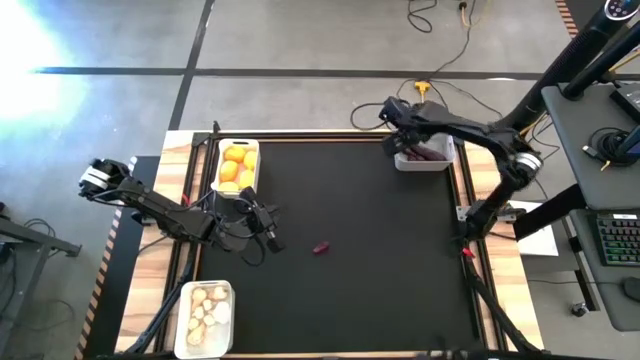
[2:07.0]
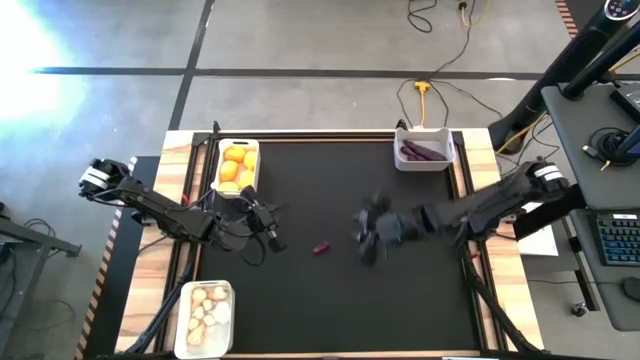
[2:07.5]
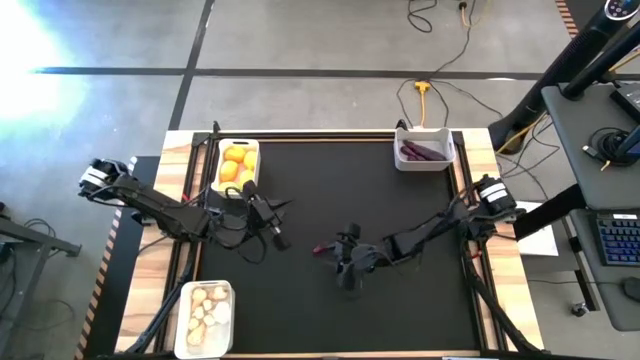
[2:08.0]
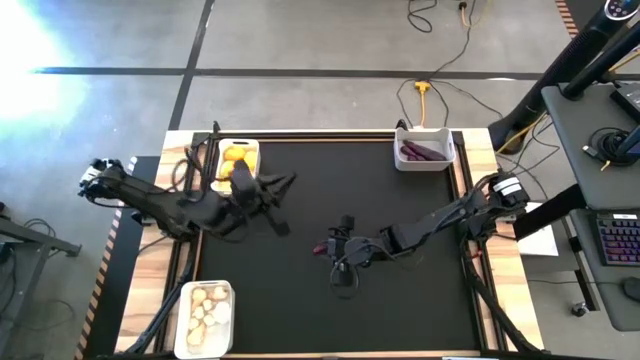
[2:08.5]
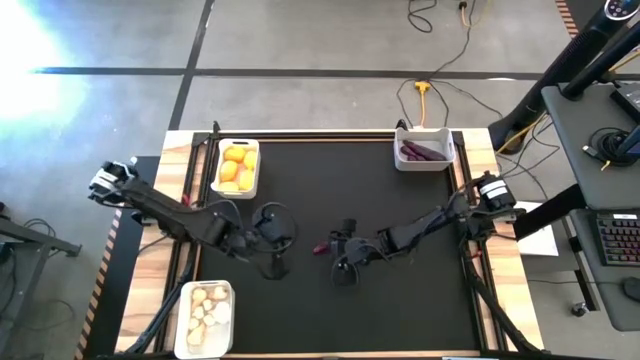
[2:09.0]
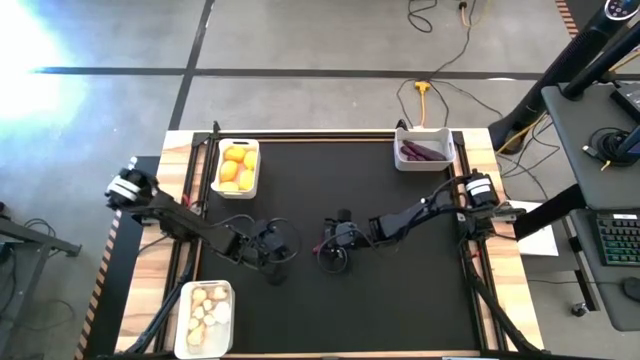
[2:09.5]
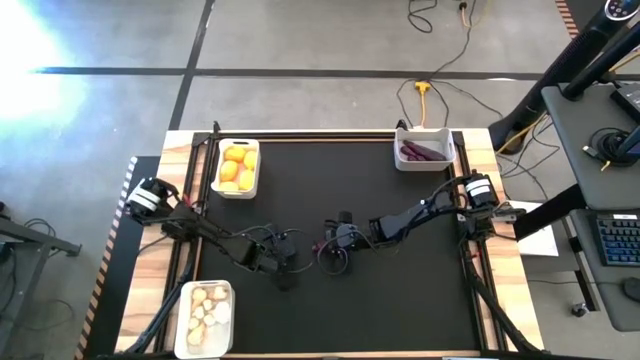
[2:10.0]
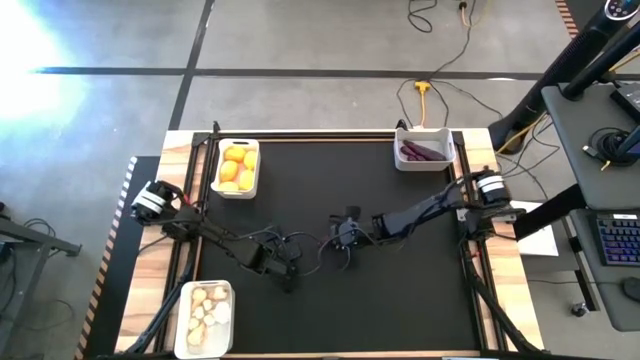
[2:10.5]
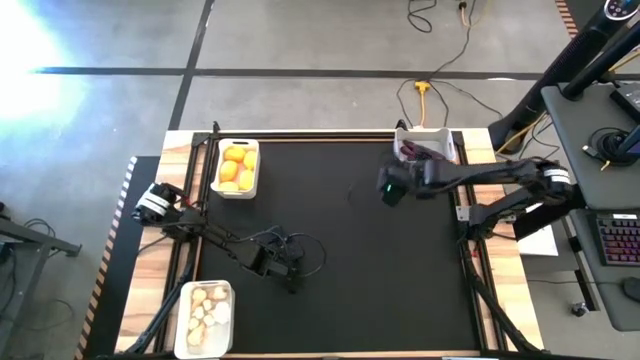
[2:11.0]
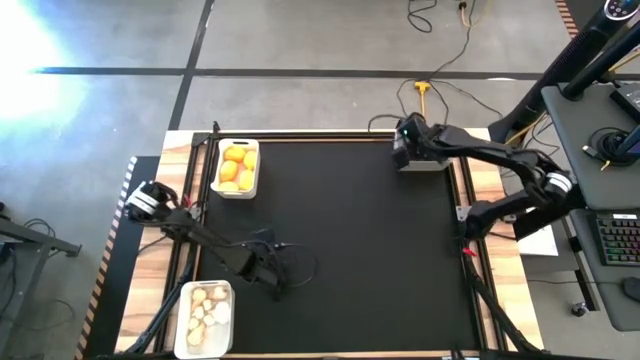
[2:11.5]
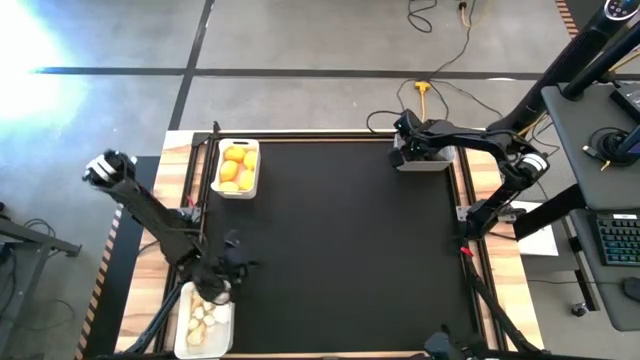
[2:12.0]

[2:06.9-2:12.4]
Task: Sort produce into baskets
Put the small eggplant into the gray bin

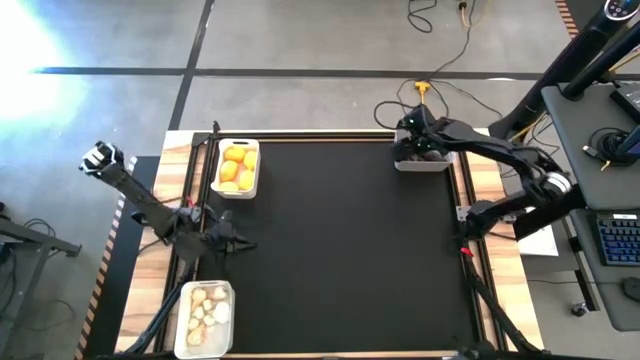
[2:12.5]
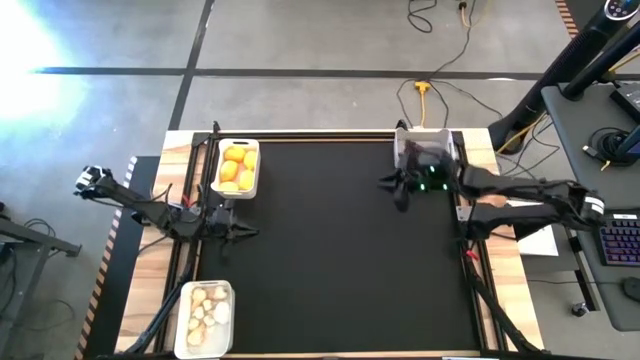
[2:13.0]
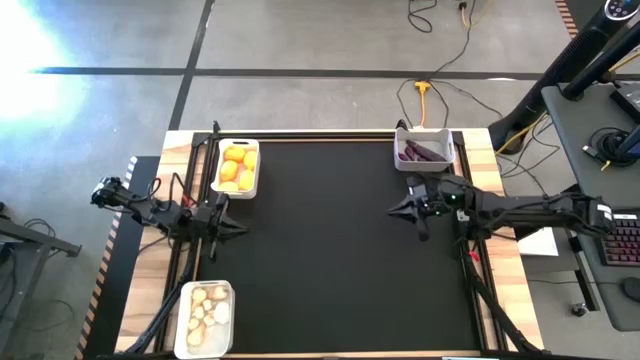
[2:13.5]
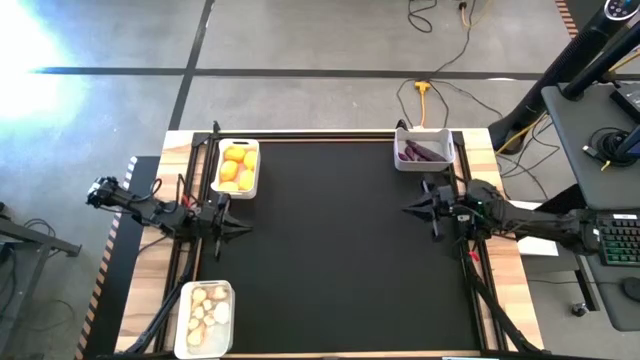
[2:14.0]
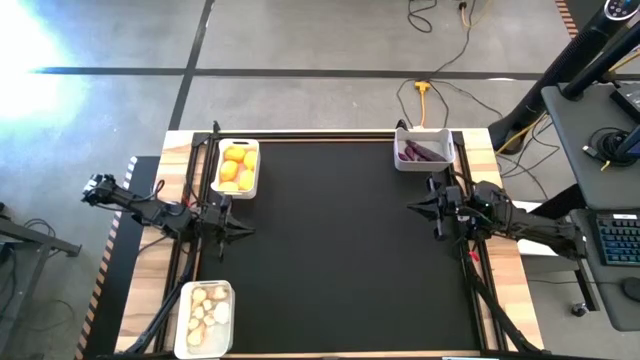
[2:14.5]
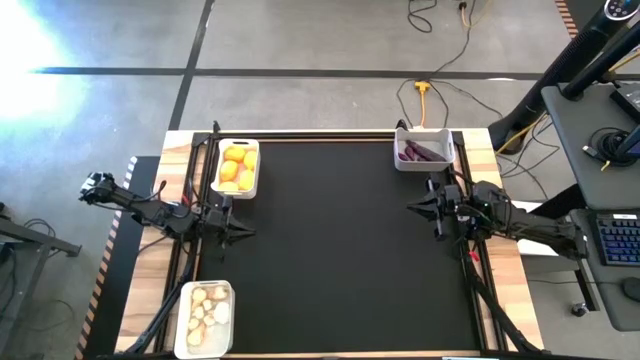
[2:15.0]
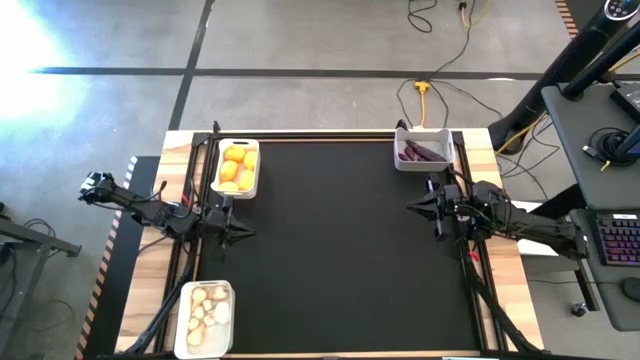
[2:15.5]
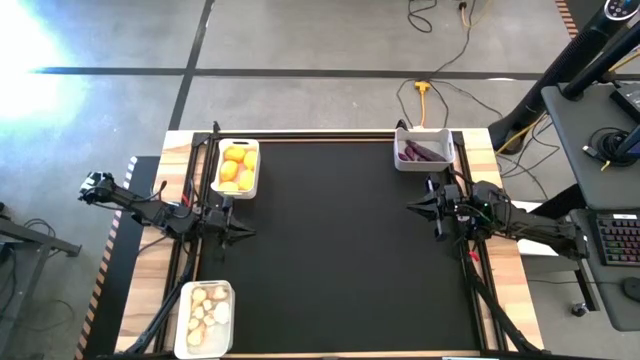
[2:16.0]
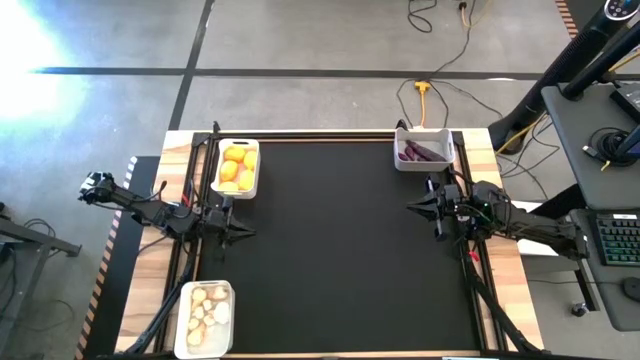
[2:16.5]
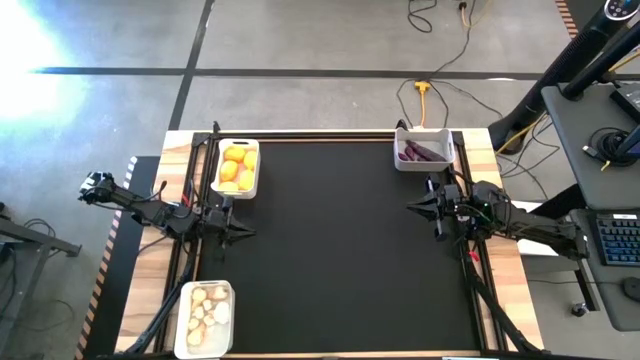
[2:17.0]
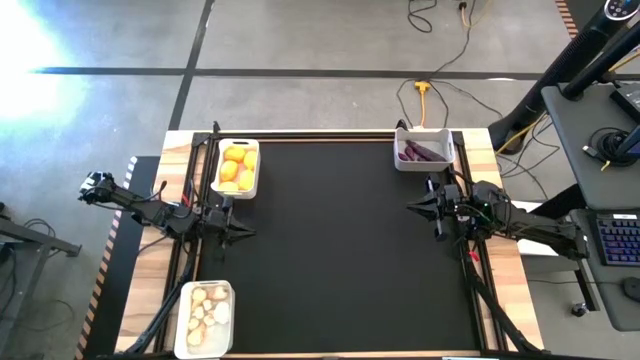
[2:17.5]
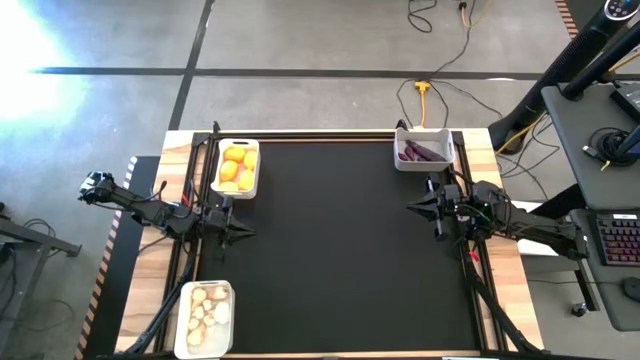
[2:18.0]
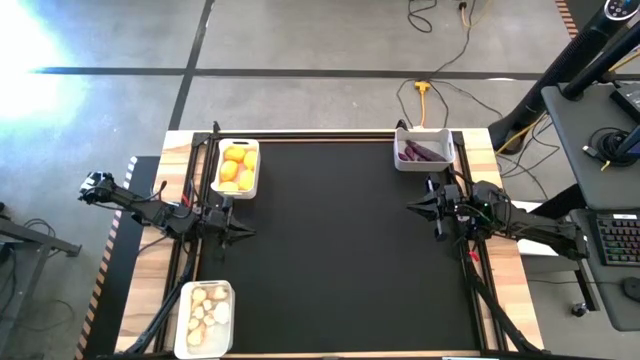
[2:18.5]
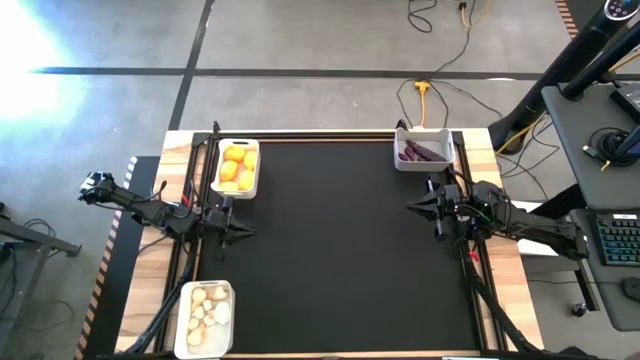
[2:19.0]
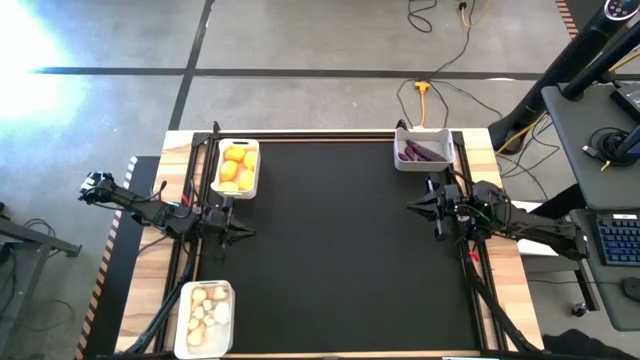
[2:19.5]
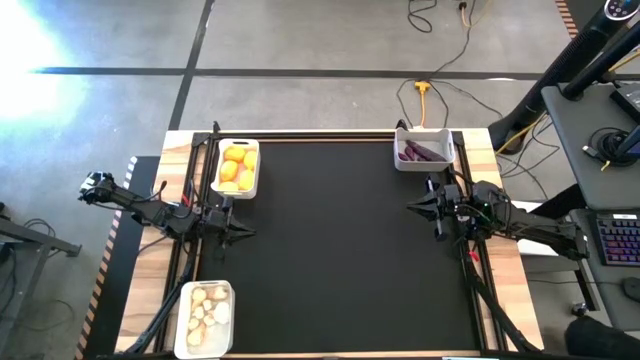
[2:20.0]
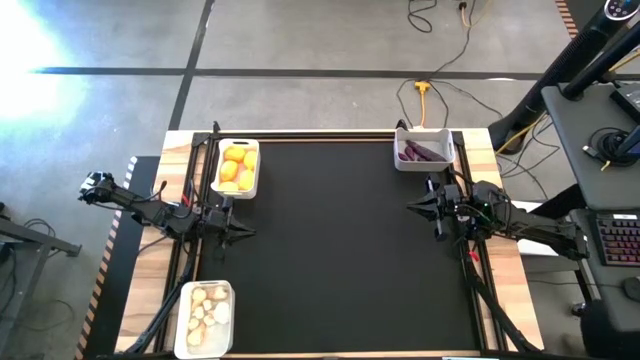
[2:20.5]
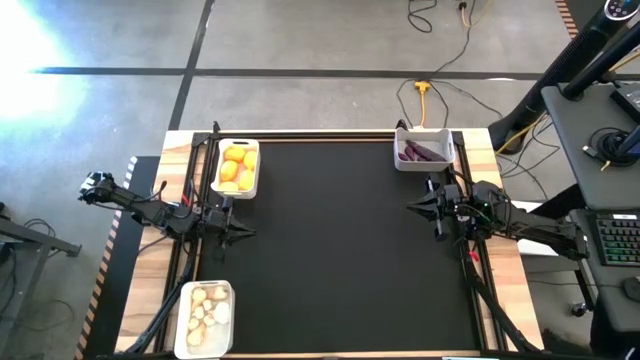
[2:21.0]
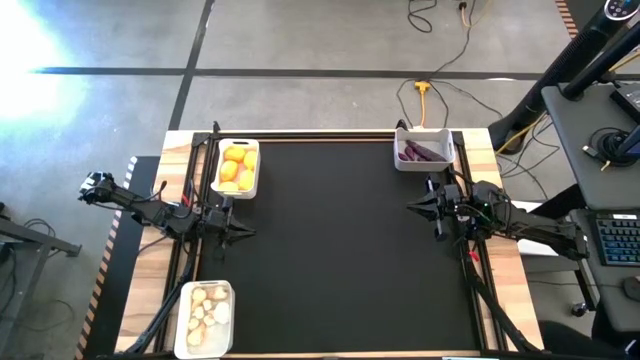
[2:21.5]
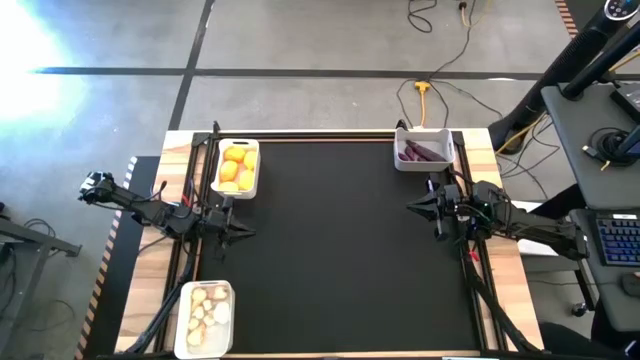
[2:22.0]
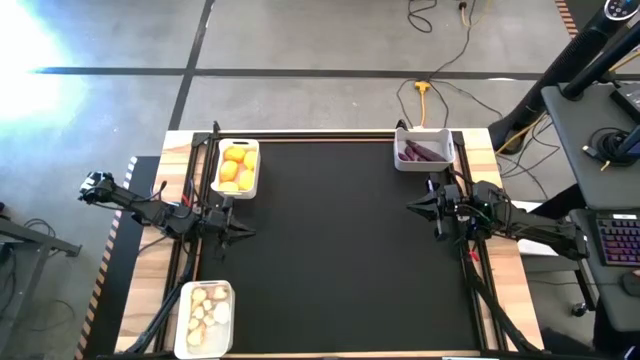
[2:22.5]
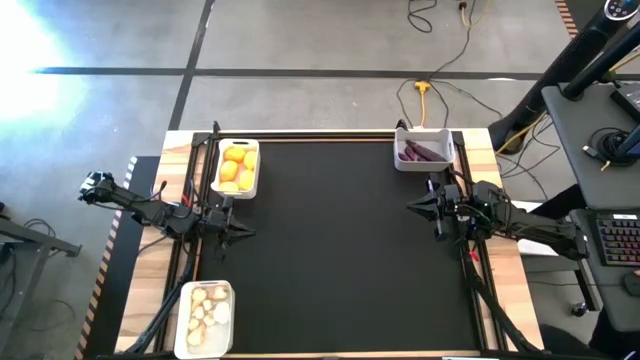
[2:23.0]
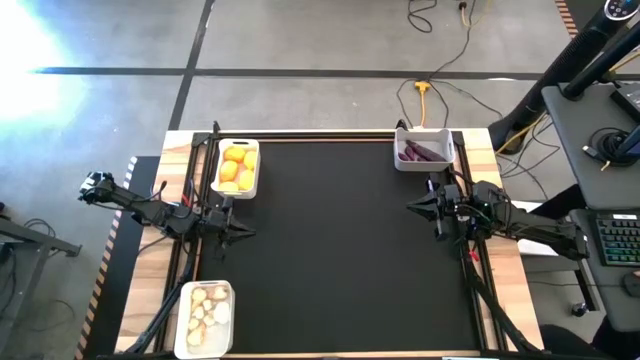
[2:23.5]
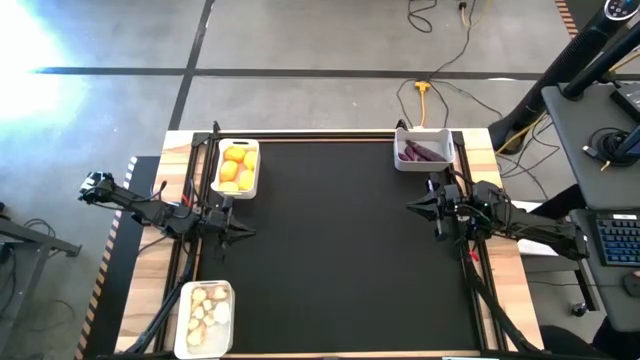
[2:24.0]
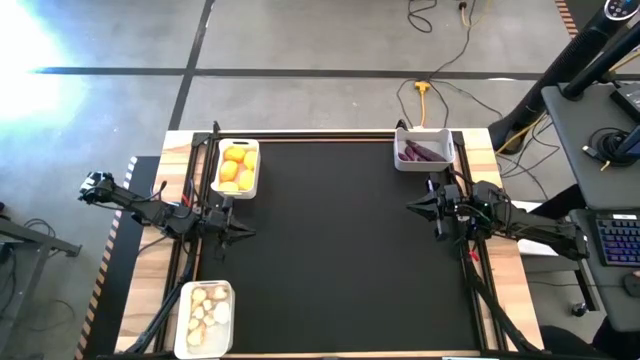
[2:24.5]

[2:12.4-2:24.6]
Return to Home Position
